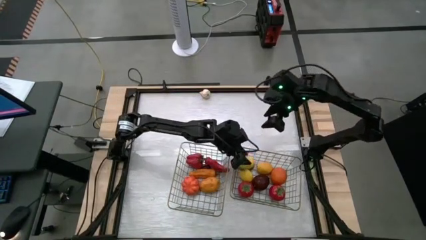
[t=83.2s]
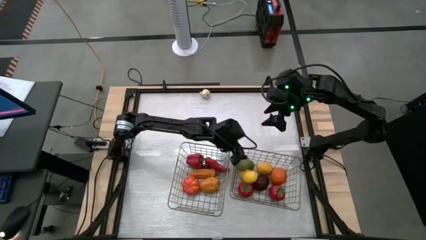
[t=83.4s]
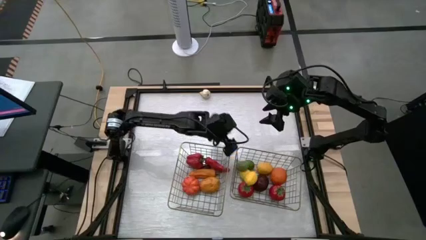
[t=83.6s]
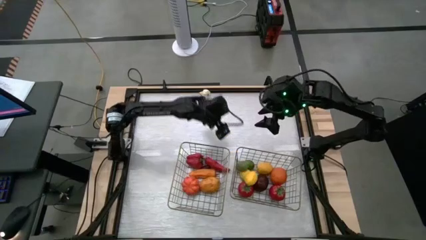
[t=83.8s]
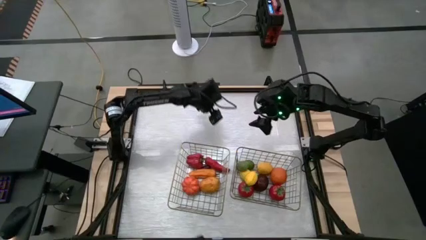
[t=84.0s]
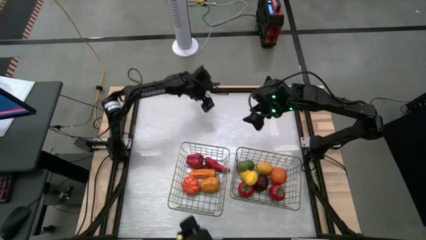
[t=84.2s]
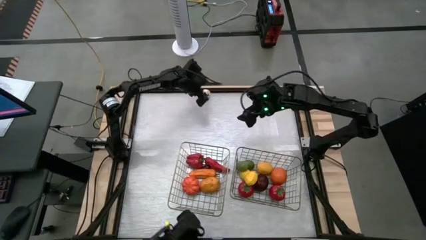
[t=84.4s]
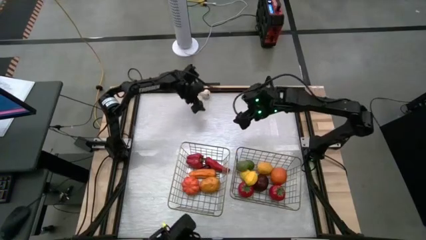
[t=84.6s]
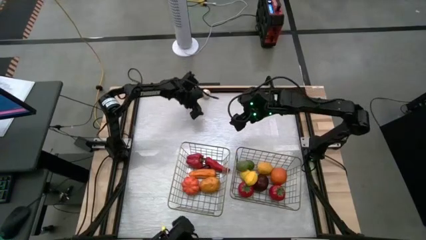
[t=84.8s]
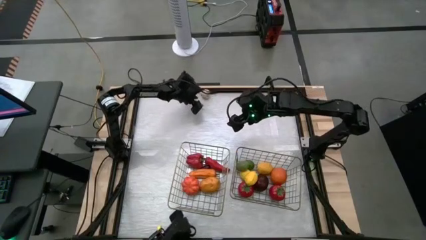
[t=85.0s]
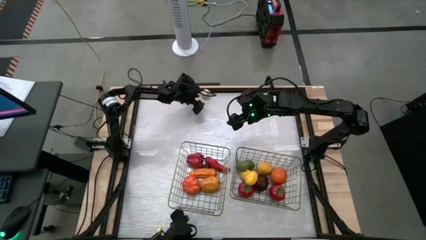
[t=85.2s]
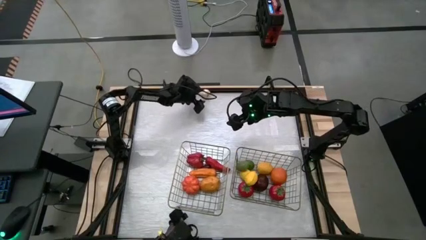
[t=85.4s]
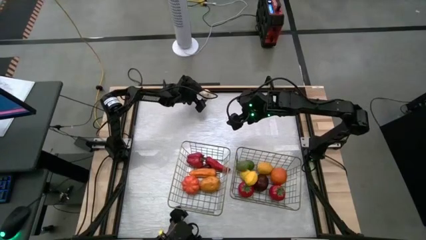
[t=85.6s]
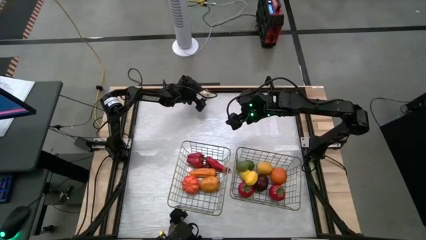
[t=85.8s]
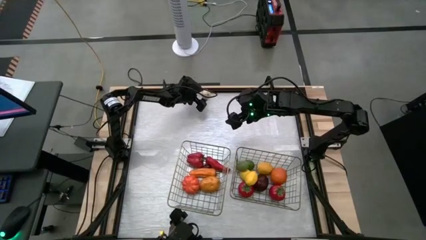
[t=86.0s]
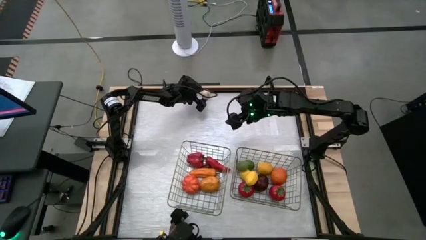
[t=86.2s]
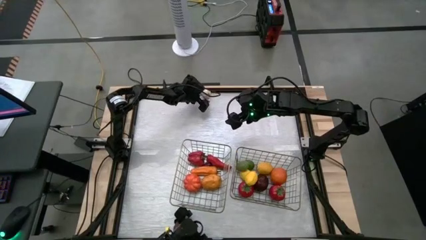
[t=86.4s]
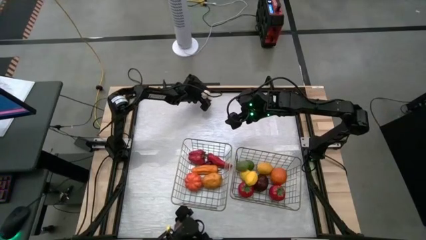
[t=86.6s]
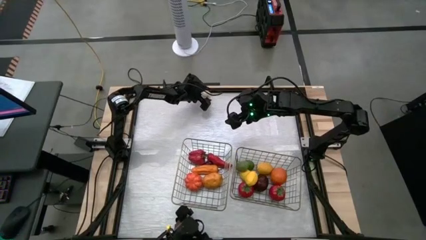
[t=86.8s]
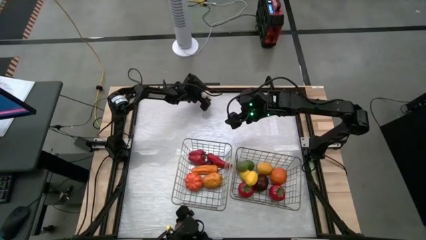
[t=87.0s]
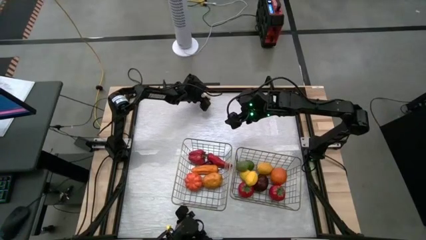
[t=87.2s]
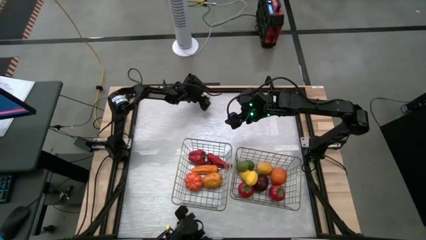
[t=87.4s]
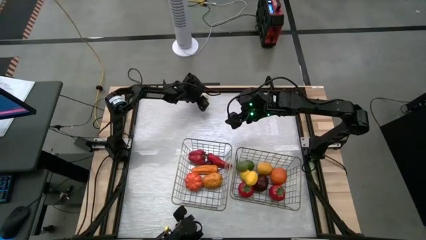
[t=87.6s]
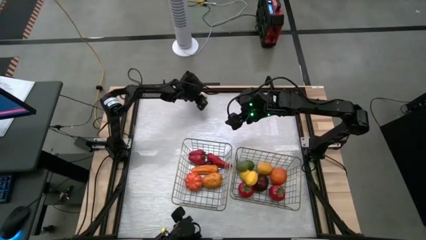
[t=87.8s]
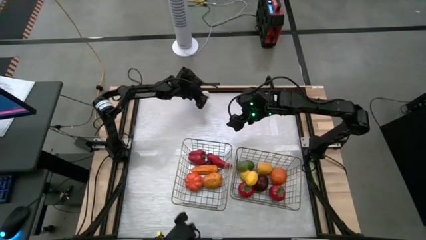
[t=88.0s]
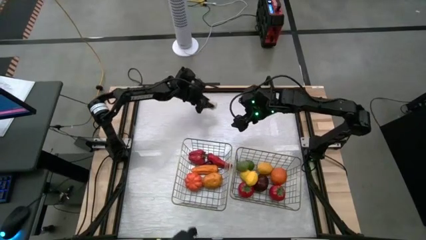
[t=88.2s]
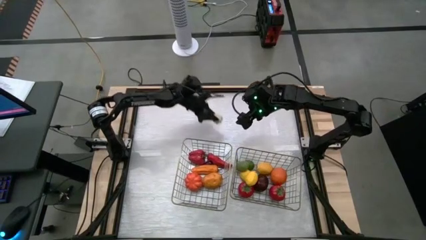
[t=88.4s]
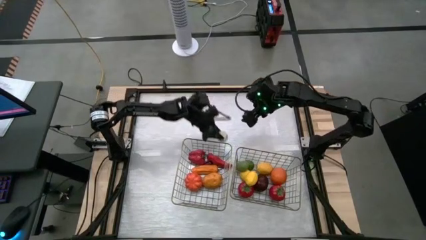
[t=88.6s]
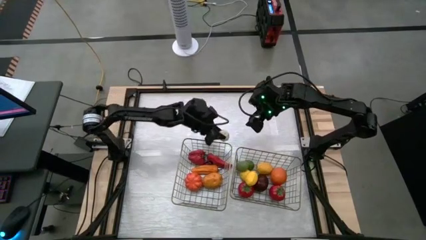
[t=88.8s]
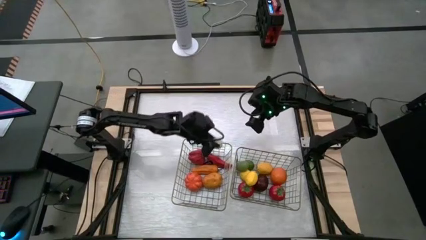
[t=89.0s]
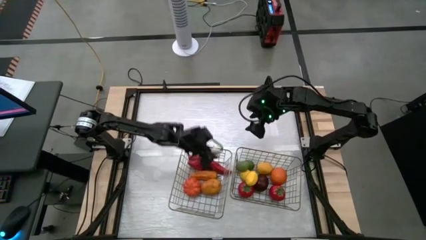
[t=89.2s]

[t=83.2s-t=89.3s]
Task: Sort produce into baskets
Put the white garlic into the left wire basket

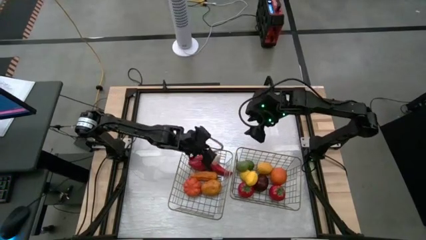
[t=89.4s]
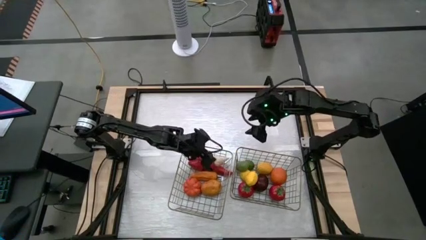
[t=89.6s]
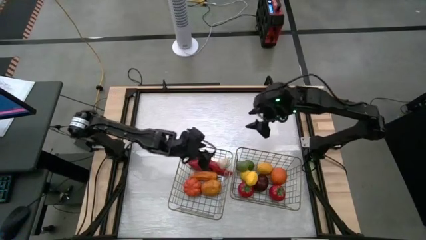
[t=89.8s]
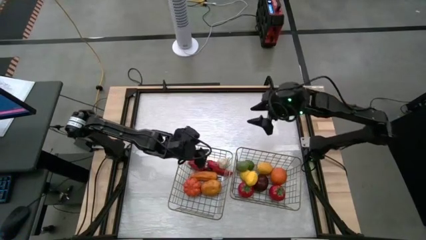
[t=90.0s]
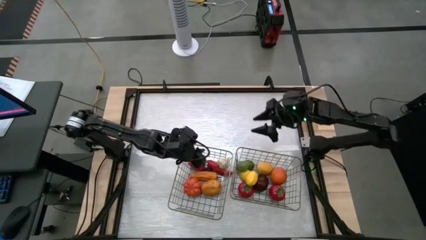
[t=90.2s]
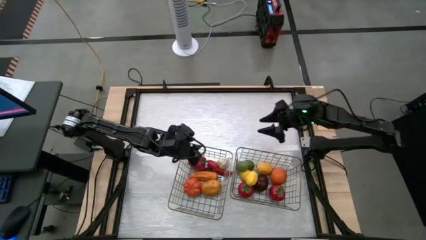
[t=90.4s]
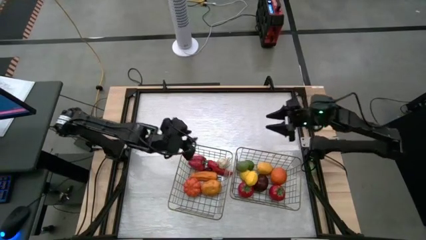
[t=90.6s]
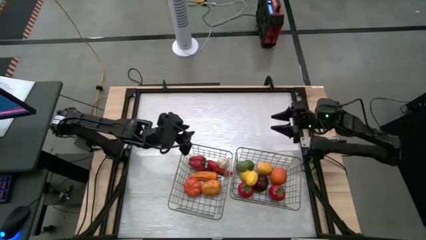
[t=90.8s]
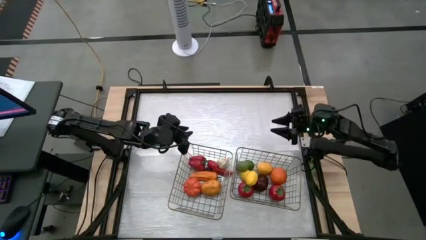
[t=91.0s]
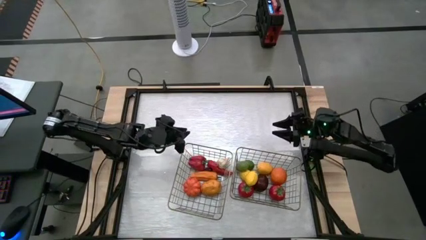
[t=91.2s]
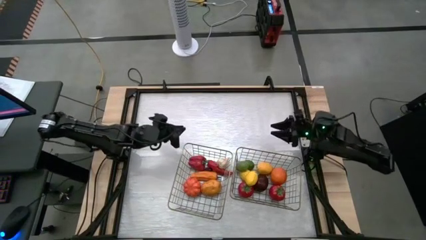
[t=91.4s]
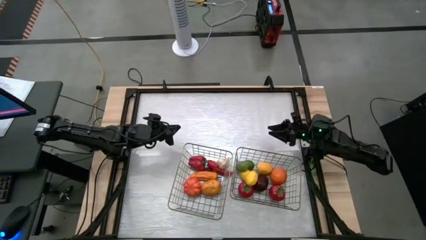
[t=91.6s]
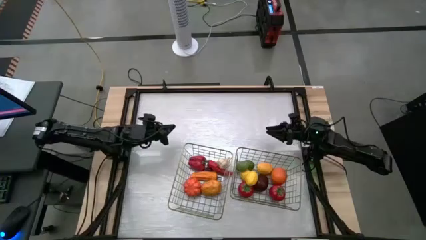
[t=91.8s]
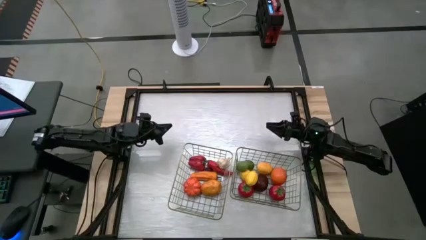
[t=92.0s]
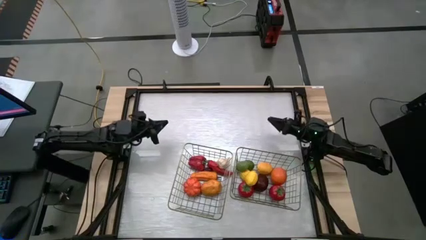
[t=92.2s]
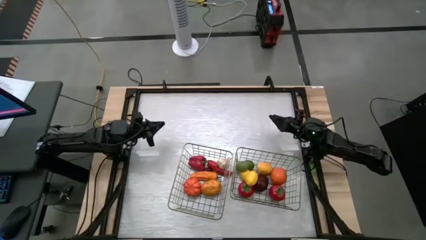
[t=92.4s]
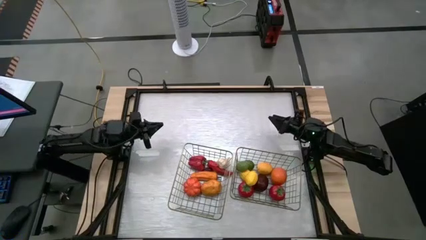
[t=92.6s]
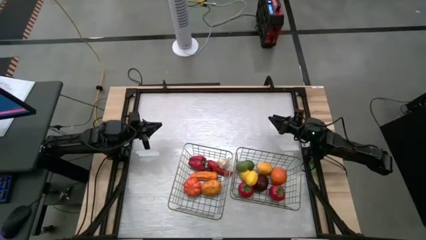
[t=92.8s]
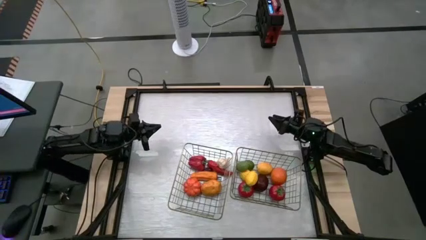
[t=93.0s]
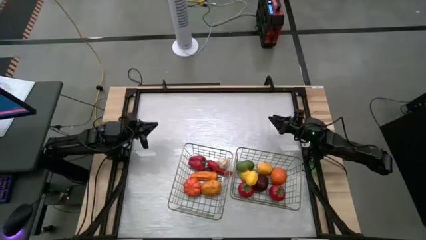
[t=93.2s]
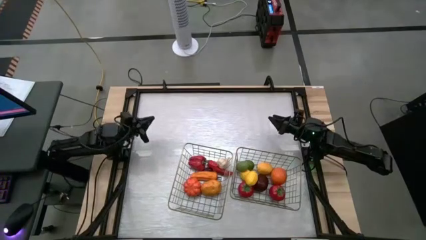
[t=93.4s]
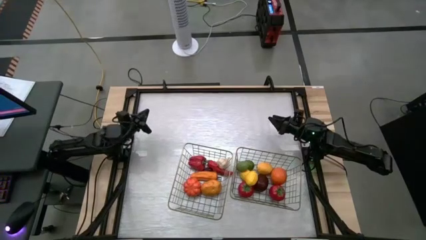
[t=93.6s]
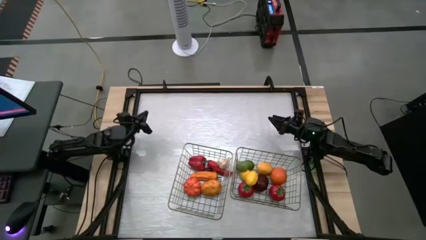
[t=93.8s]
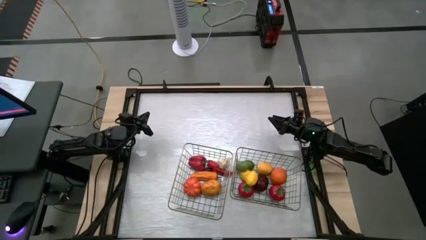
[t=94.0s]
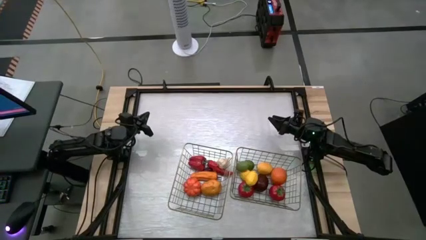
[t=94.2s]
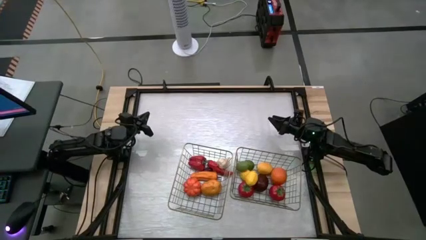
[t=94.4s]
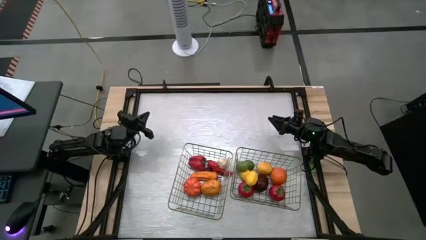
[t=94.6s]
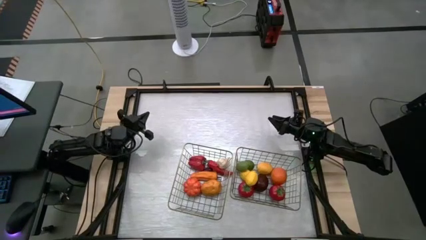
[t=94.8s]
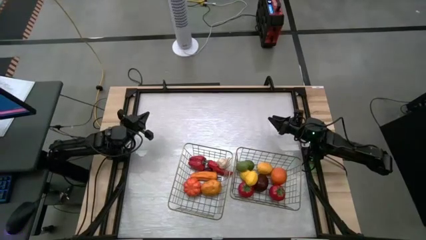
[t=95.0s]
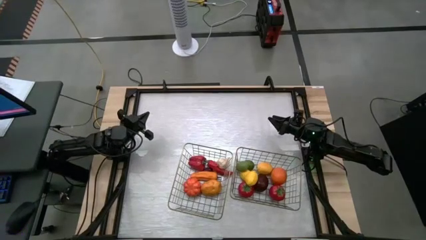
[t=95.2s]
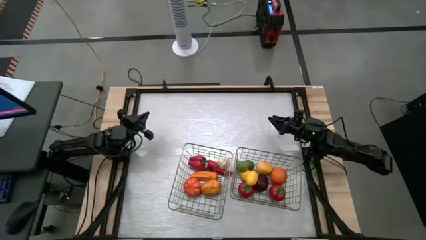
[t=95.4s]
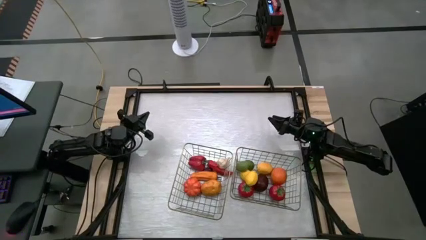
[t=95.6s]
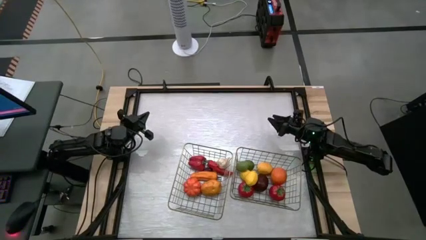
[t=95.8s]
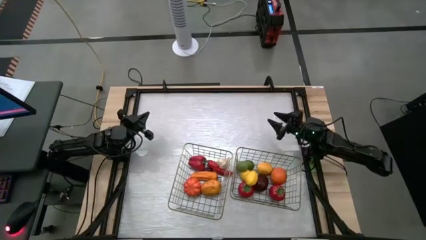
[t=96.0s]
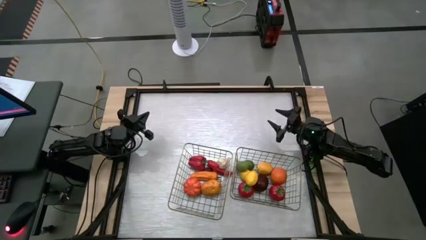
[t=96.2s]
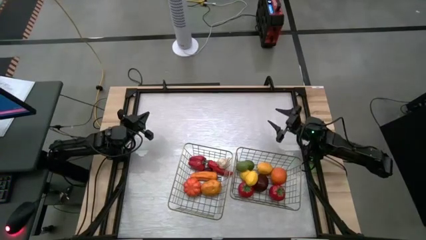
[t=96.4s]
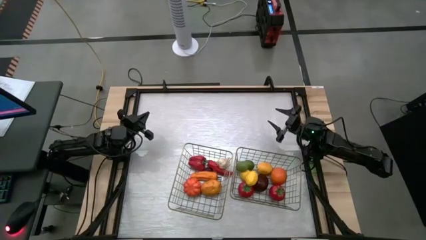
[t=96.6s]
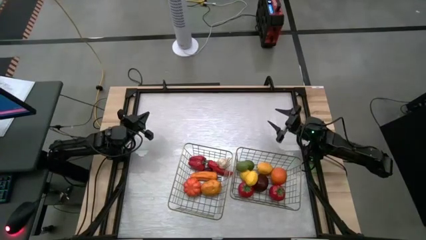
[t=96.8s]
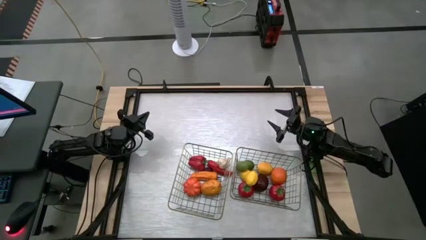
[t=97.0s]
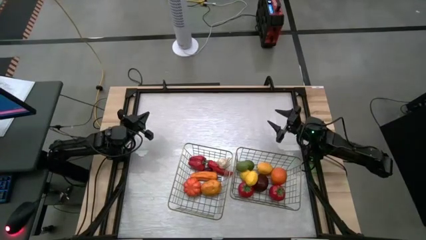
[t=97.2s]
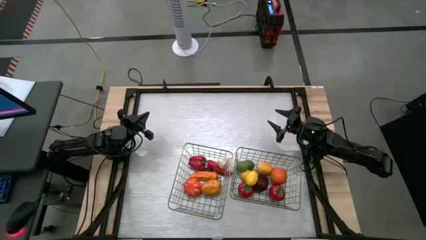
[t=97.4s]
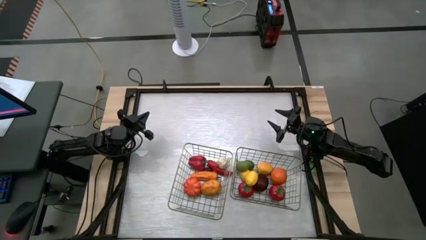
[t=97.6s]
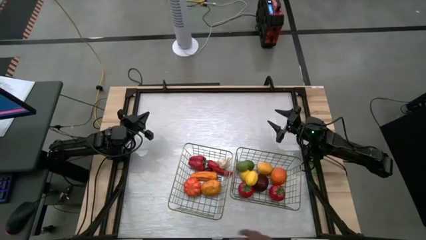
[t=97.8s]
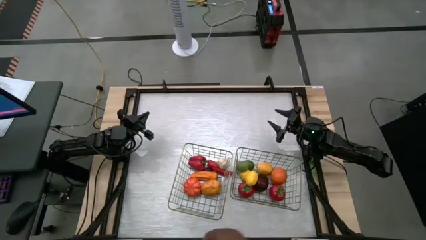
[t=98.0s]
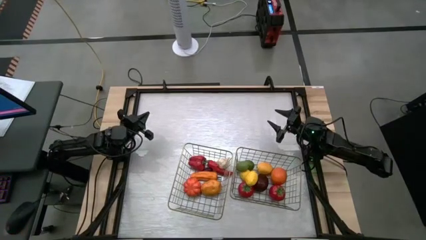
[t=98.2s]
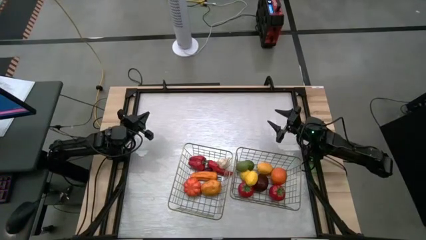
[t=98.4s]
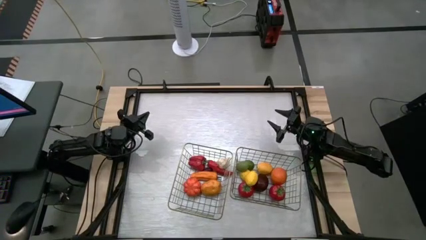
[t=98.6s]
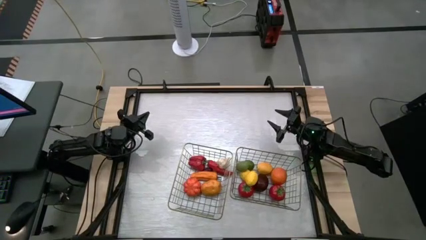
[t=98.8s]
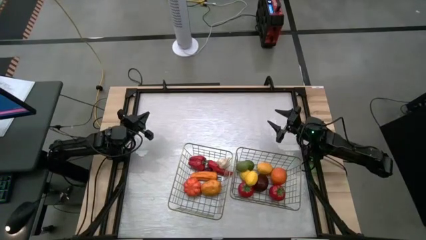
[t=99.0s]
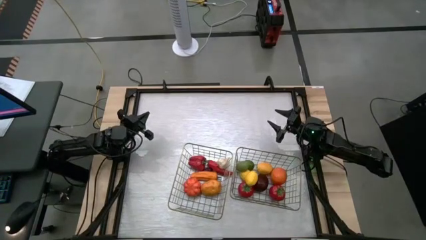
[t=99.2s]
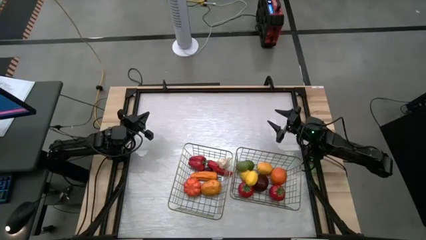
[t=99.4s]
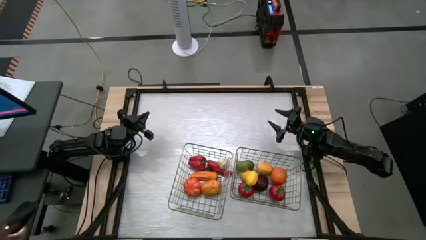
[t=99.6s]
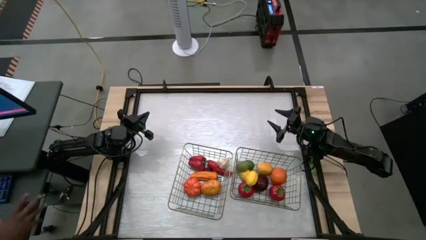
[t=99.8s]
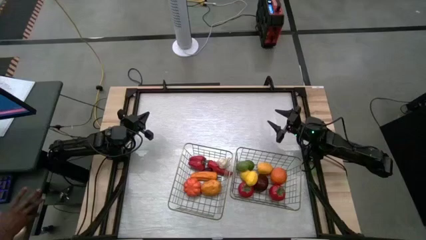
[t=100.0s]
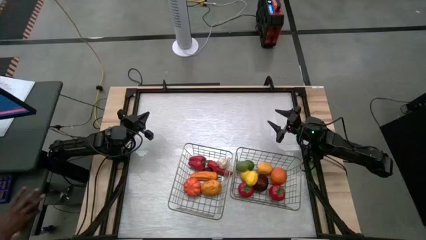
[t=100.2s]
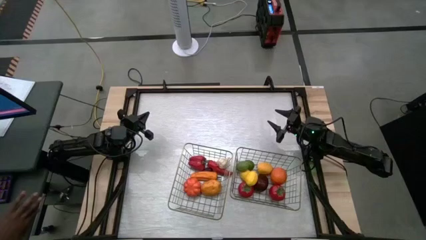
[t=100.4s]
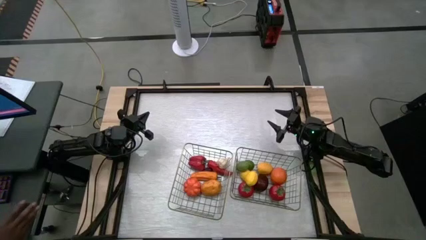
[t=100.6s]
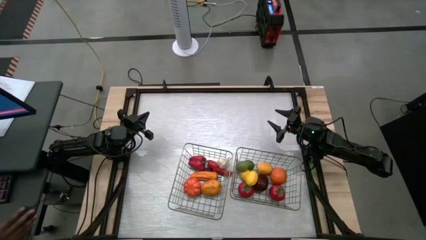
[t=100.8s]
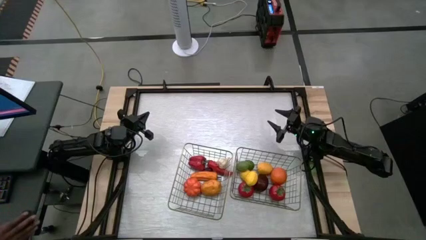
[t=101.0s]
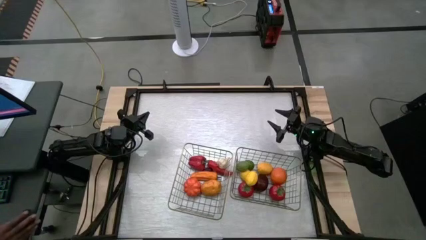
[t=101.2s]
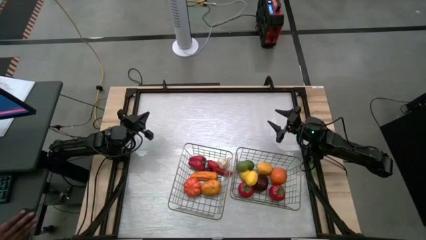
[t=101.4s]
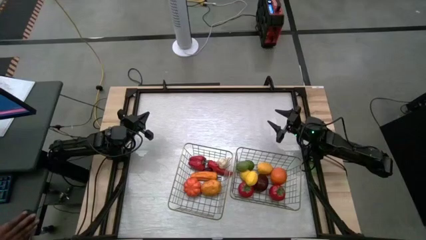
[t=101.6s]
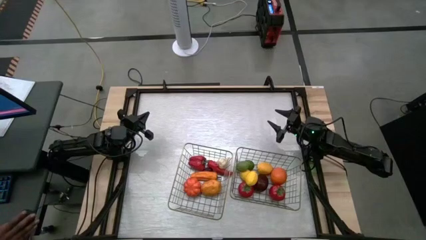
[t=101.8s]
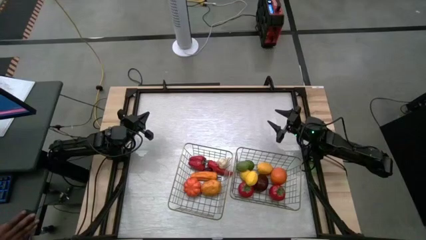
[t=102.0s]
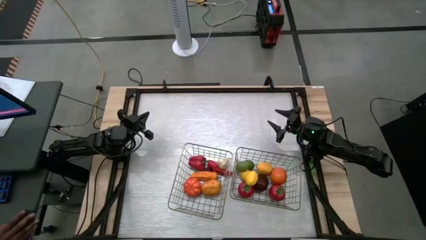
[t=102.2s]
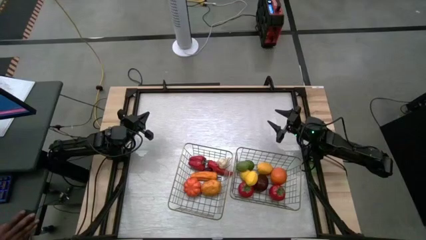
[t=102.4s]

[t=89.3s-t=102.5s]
Return to Home Position
